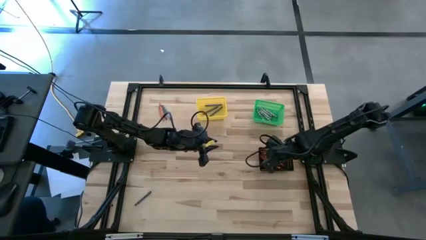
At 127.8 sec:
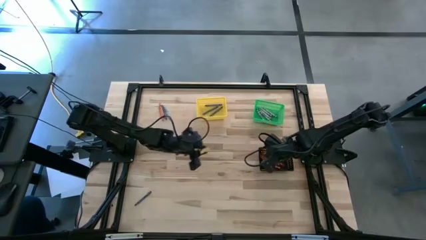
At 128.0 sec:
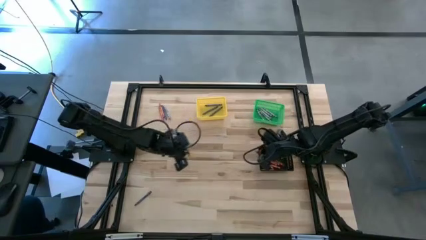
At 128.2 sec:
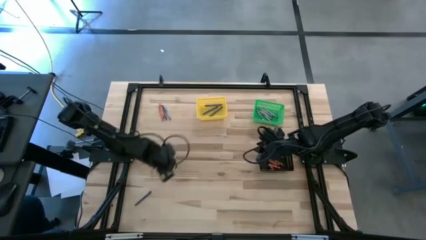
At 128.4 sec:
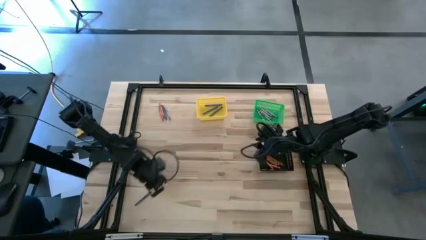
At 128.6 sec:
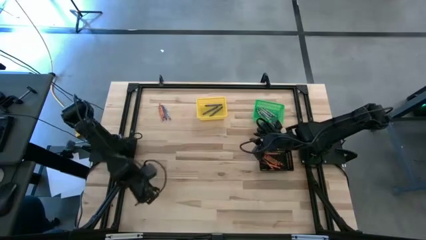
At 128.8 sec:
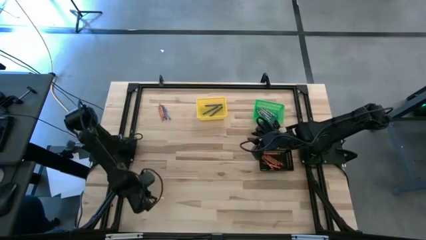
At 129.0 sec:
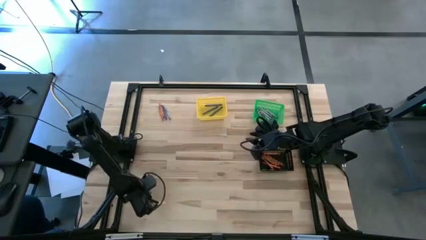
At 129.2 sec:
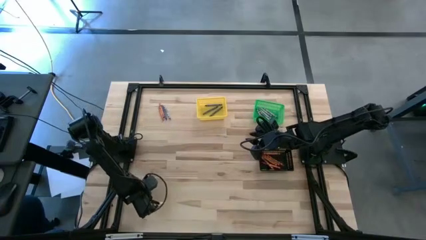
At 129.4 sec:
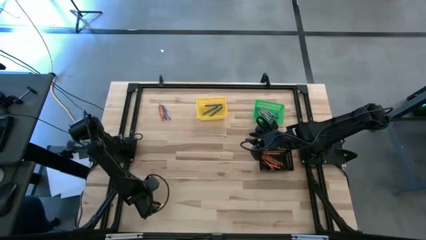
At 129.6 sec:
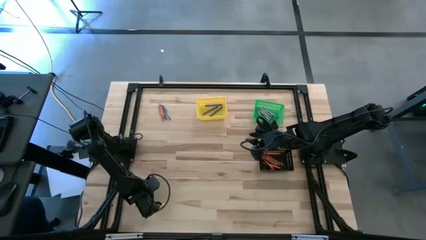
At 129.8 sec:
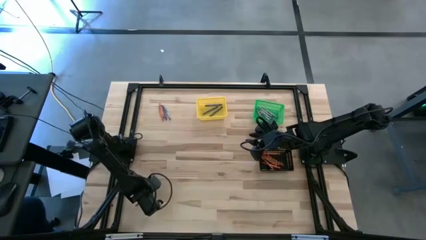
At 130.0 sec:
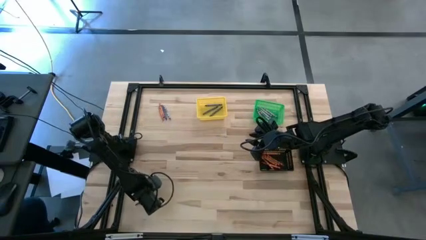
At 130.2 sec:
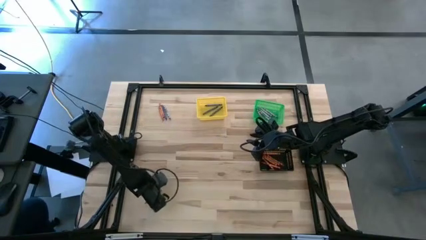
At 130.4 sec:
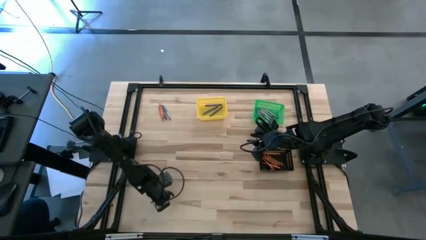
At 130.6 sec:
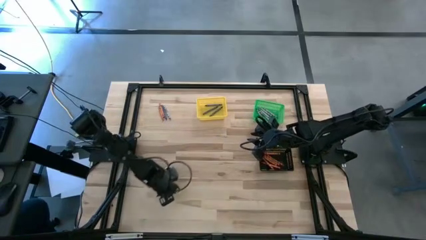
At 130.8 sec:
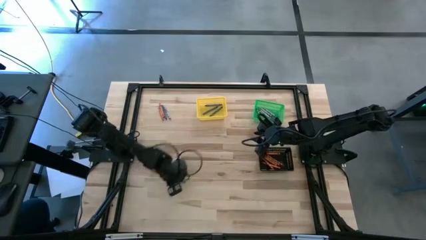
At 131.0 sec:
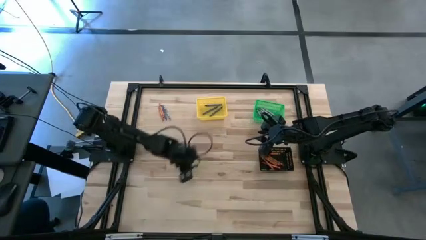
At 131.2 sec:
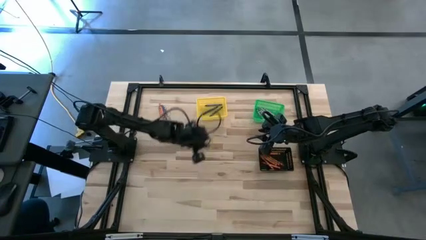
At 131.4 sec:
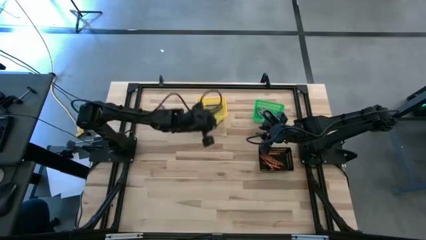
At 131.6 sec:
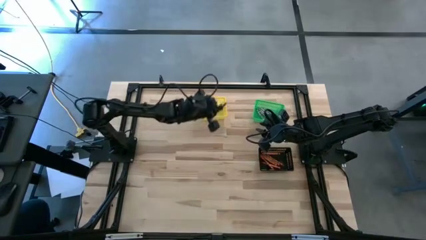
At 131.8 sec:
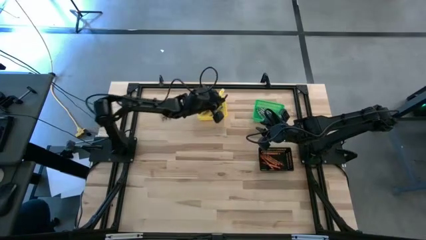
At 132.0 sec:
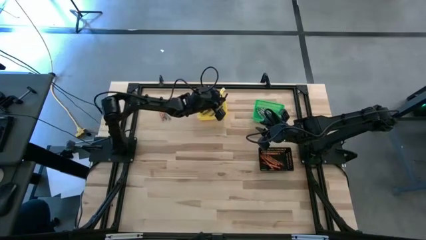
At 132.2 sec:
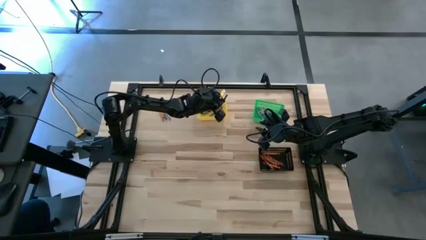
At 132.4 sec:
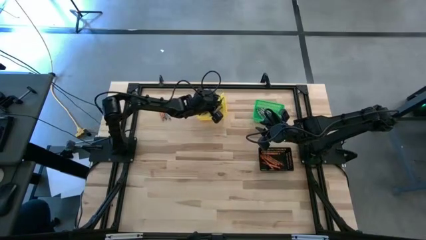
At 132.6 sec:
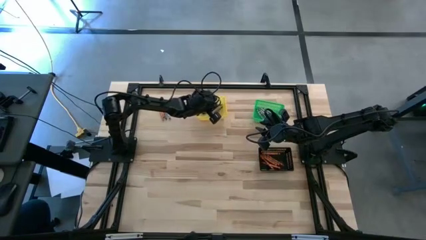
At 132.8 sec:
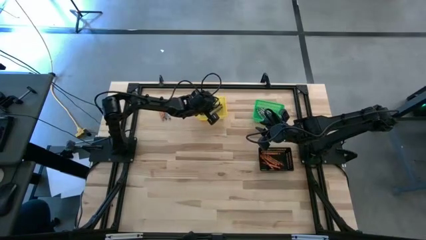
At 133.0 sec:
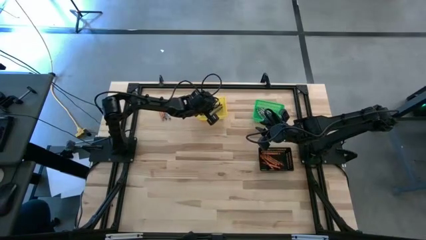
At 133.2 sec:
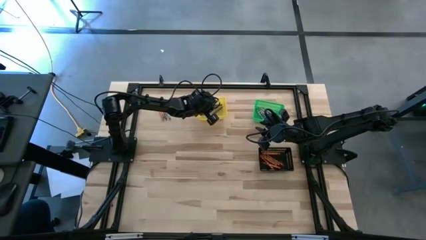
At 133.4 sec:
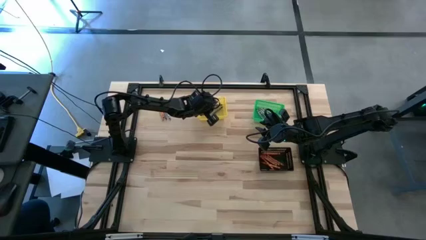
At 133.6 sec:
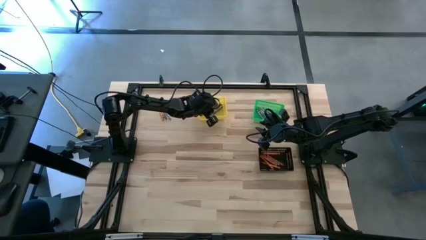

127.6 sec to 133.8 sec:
Task: Sort crayons
Put the blue crayon into the yellow basket

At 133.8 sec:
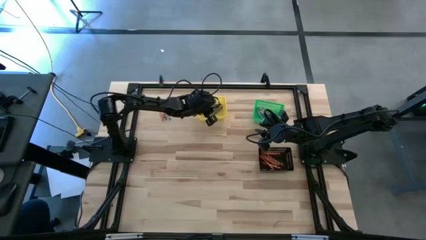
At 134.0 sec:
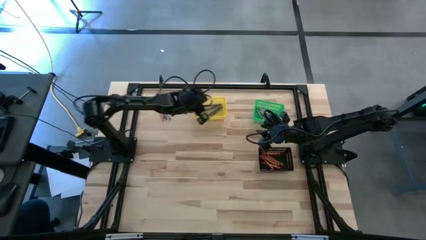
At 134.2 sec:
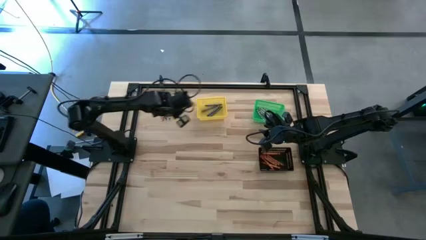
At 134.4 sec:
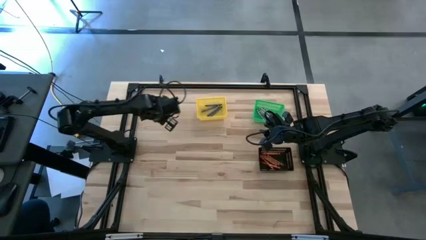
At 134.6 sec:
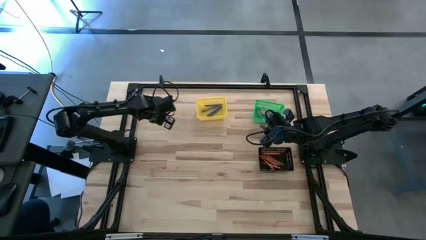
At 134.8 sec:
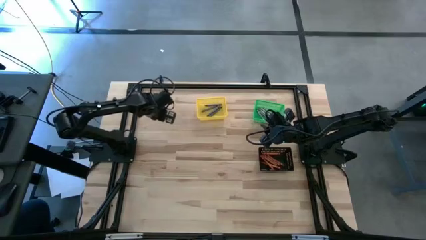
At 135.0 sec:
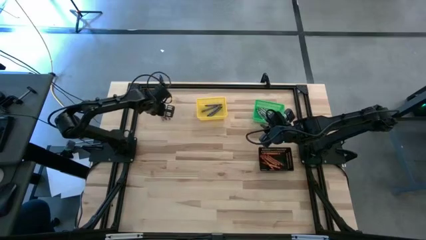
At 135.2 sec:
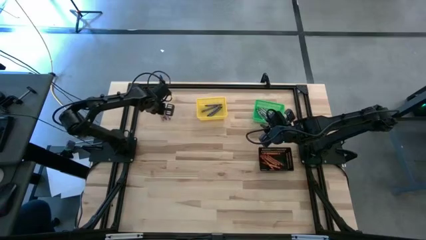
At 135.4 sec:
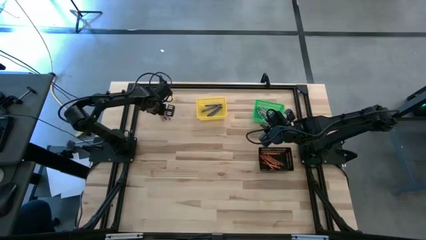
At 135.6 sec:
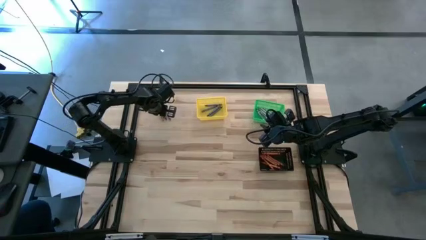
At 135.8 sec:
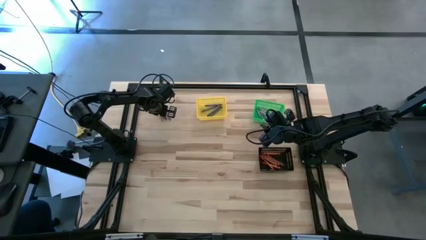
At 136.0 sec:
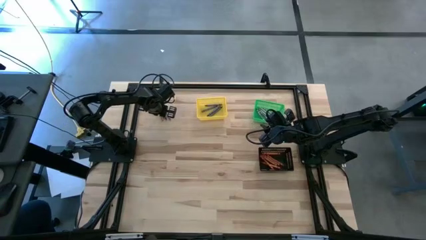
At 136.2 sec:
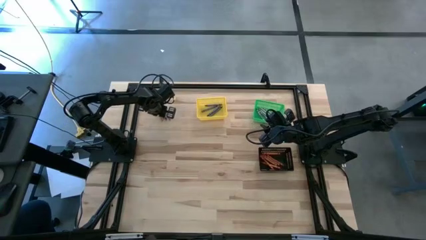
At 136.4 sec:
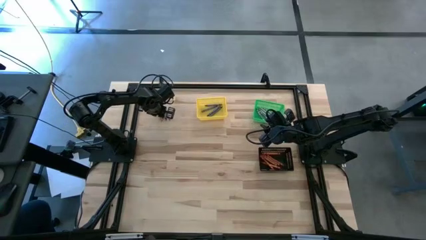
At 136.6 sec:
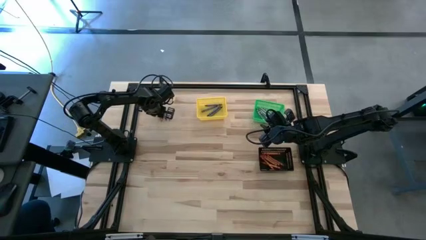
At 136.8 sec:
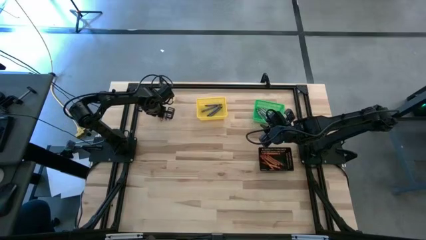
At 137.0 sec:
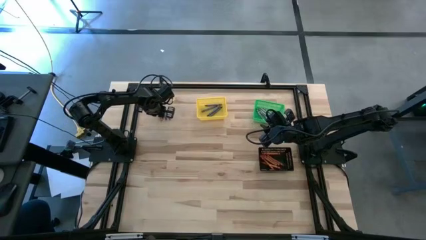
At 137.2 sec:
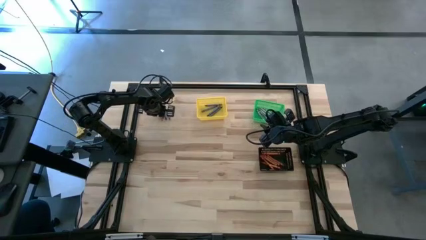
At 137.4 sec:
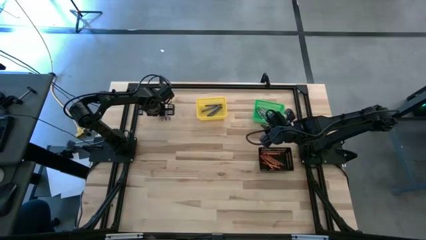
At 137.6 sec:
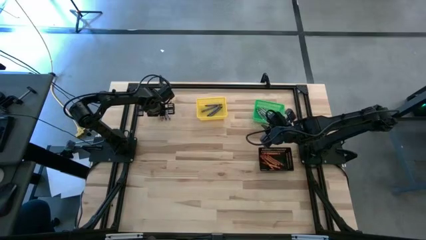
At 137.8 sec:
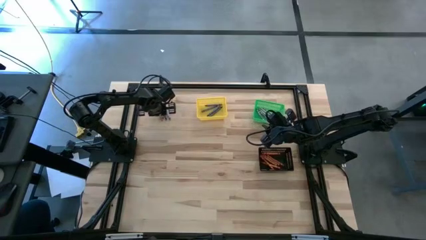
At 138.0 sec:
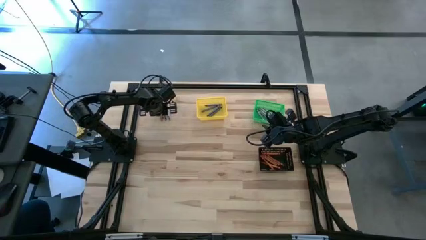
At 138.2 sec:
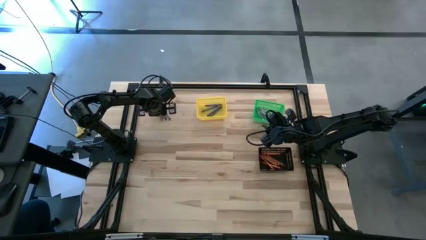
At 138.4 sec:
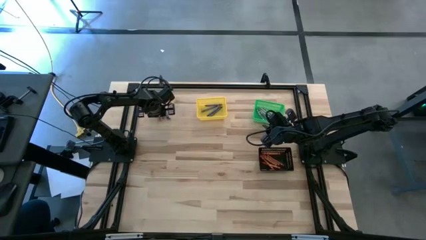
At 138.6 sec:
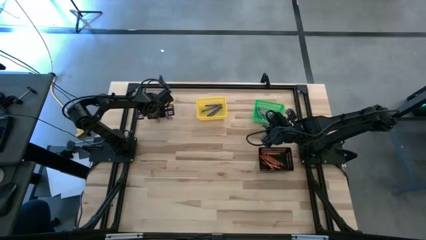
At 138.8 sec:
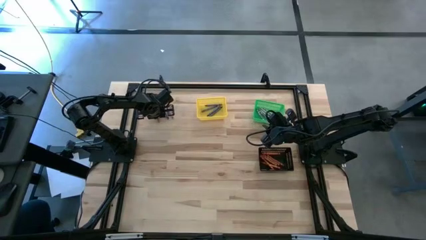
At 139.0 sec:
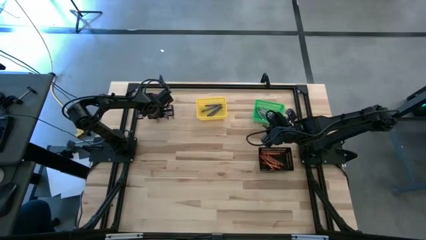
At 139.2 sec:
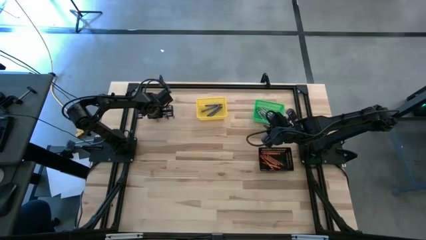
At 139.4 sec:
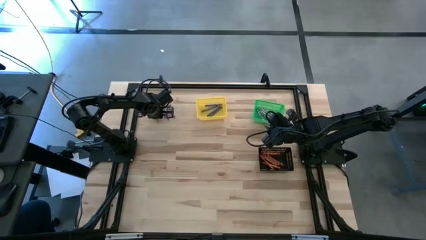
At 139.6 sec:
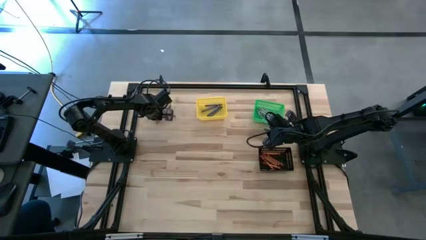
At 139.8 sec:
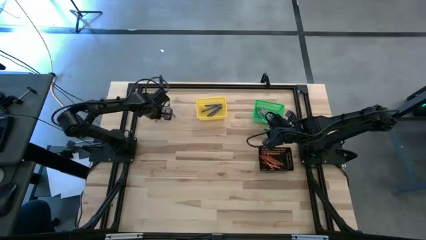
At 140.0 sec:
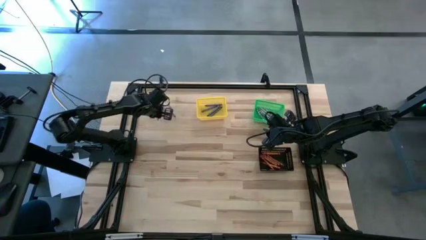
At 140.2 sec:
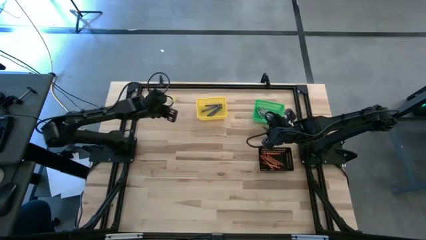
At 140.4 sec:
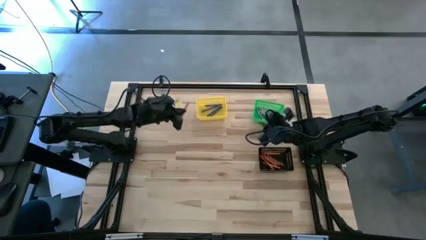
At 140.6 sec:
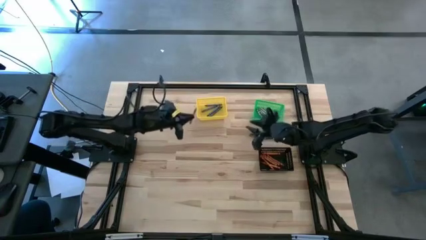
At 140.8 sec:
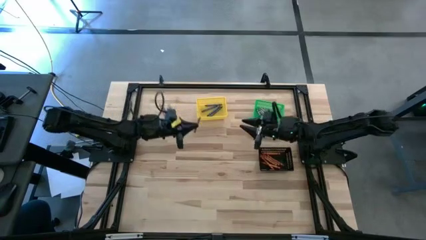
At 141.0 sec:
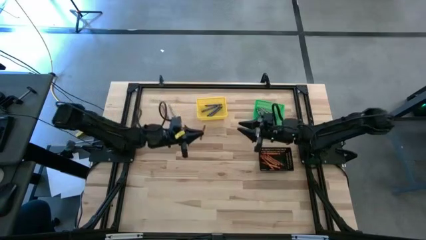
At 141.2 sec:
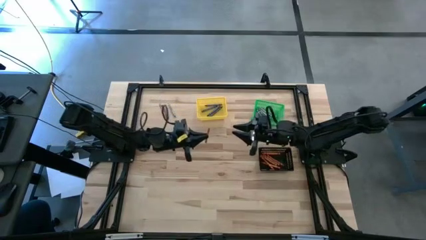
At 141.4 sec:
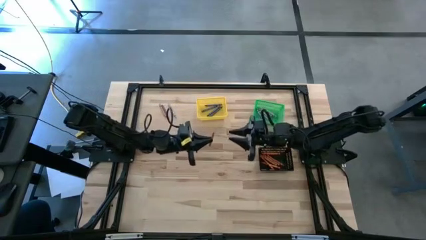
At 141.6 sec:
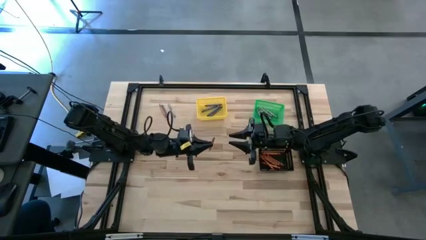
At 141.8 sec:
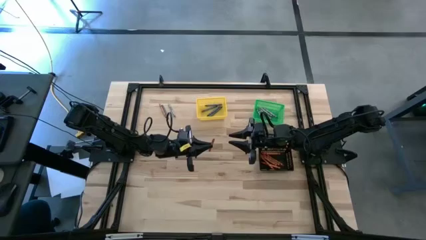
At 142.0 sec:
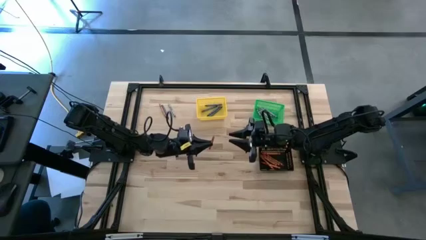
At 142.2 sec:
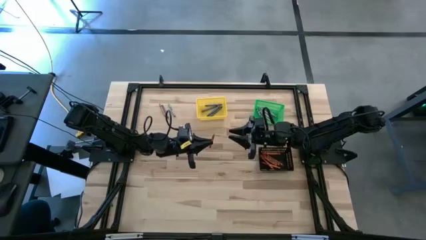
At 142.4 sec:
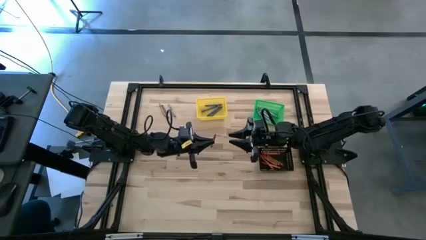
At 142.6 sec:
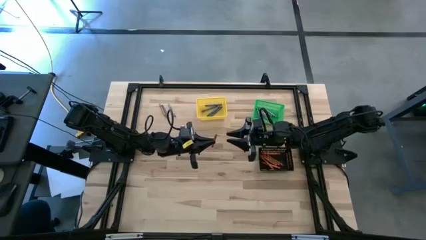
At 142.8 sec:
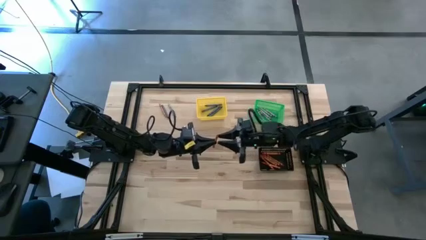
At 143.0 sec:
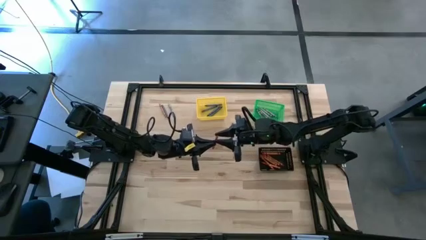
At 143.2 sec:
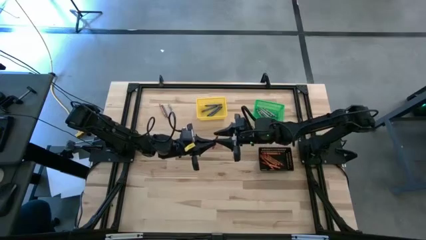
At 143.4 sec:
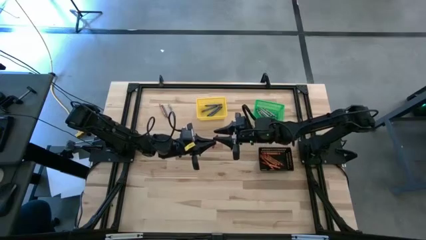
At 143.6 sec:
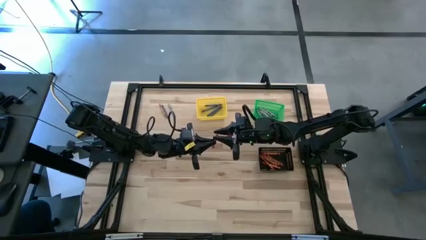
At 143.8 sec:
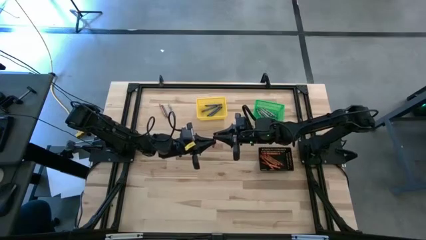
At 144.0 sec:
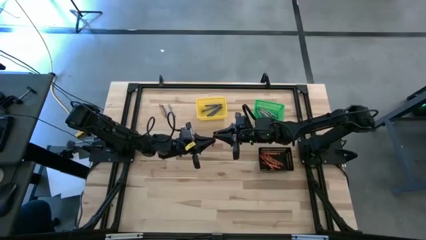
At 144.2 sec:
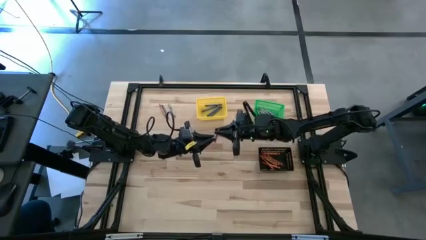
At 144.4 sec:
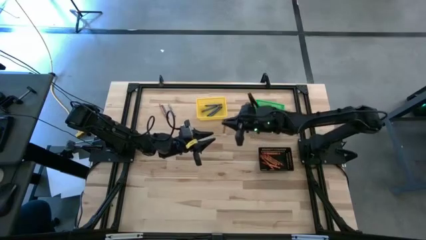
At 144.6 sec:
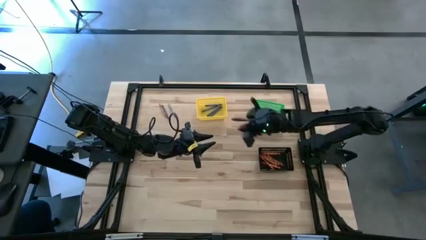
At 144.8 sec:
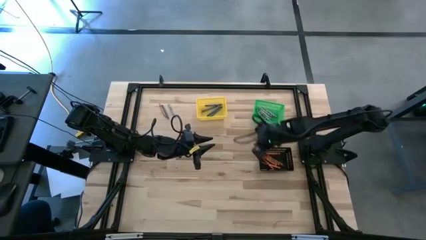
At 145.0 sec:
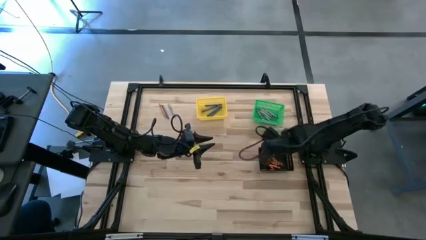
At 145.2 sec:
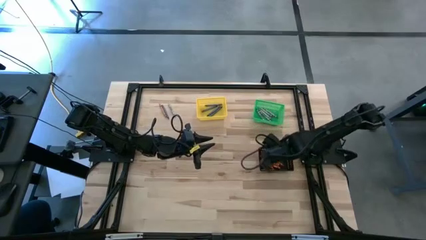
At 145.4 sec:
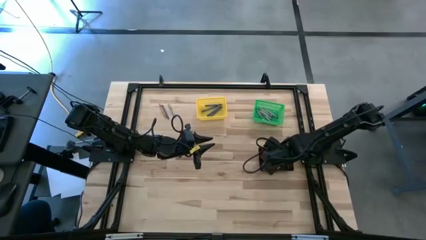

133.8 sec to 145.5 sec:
Put the orange crayon into the black basket
